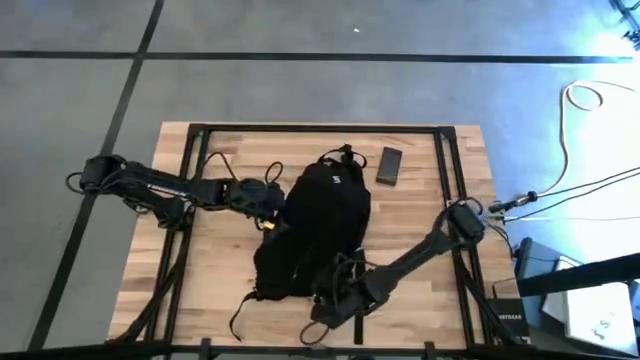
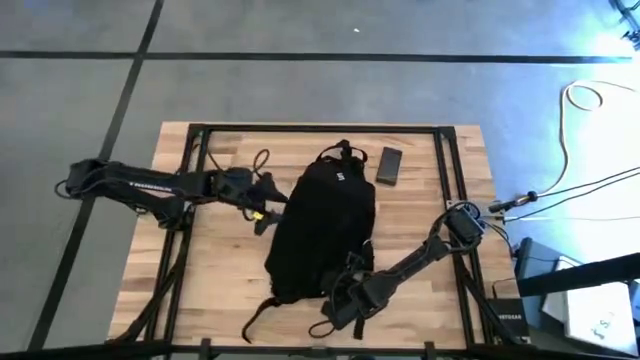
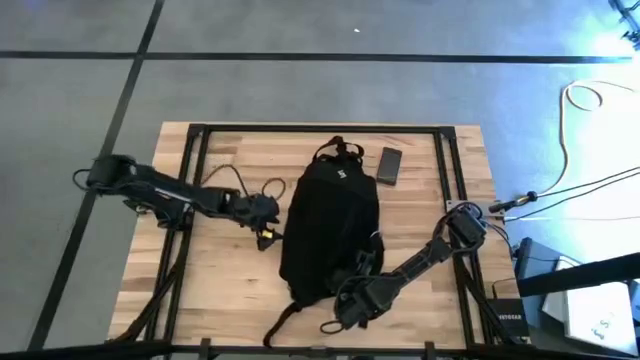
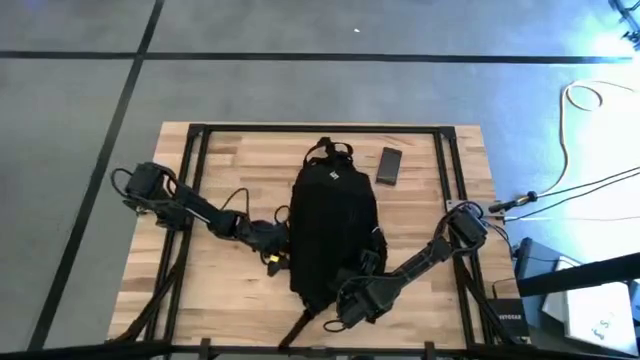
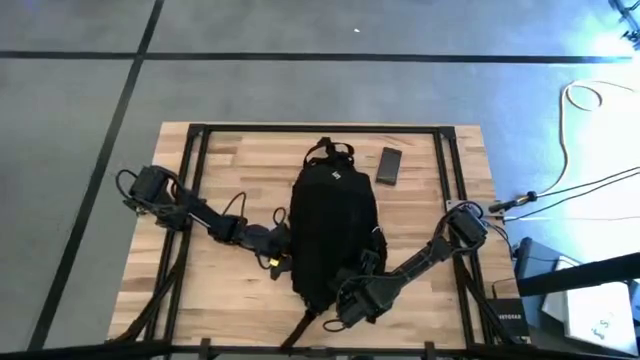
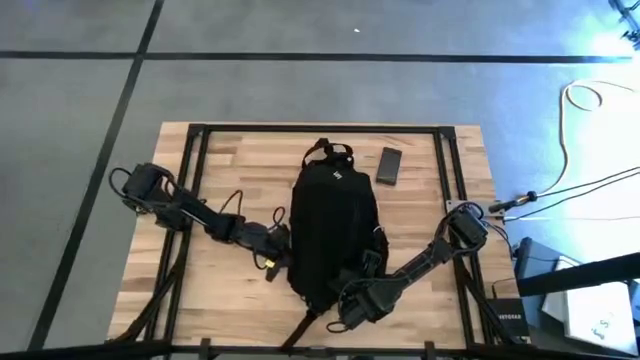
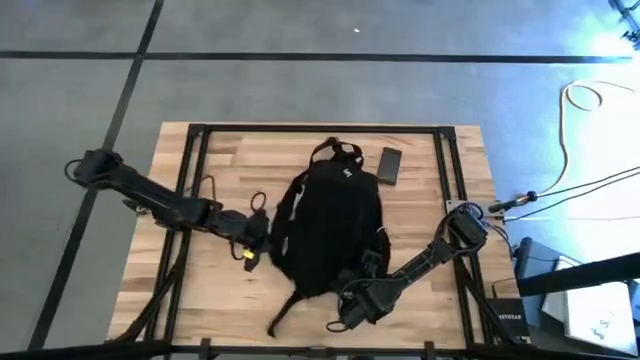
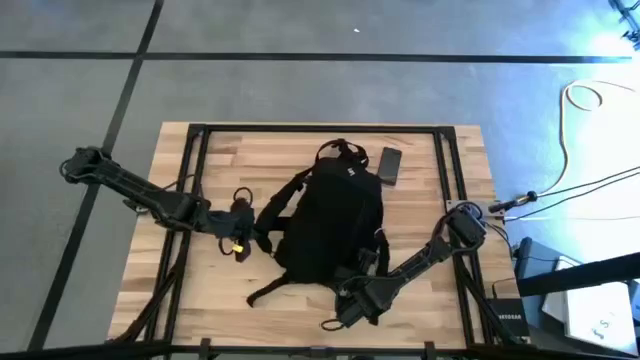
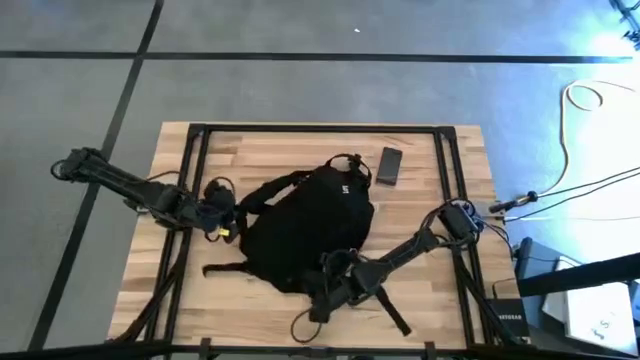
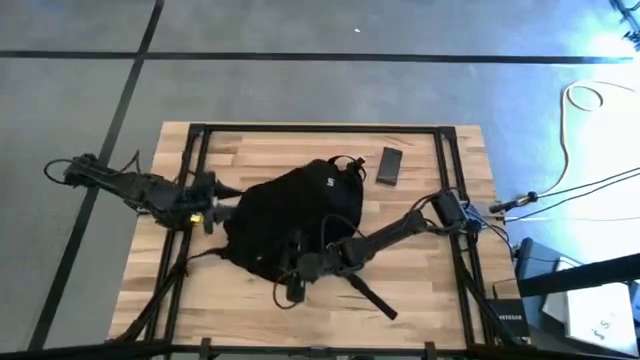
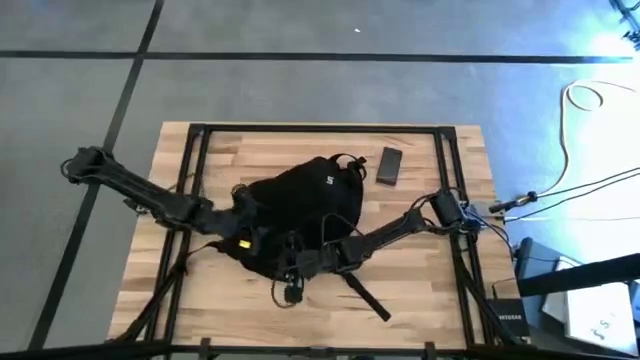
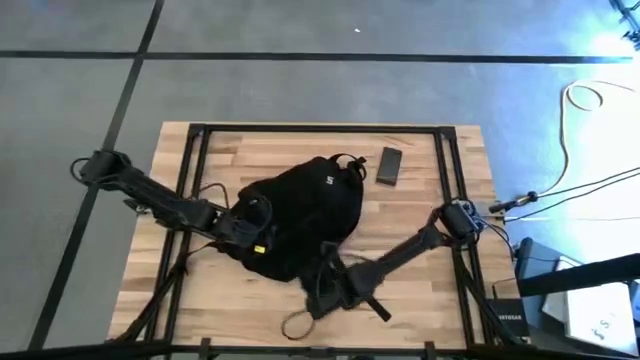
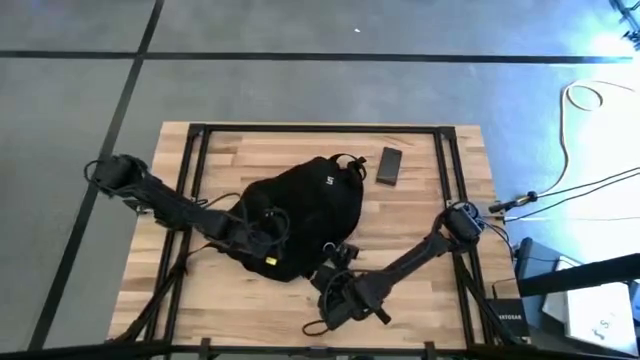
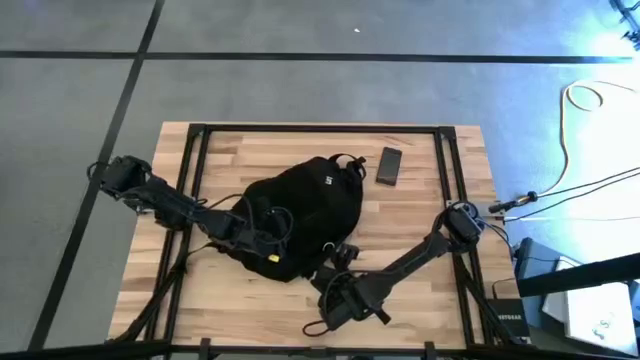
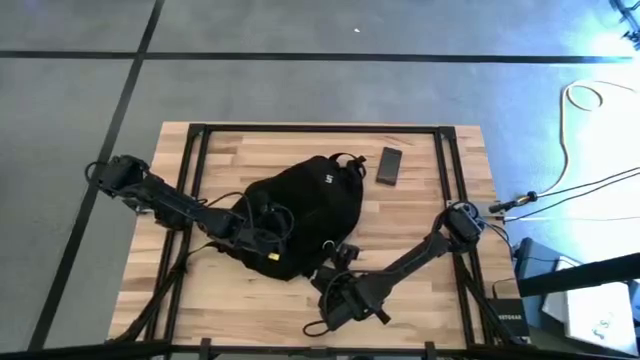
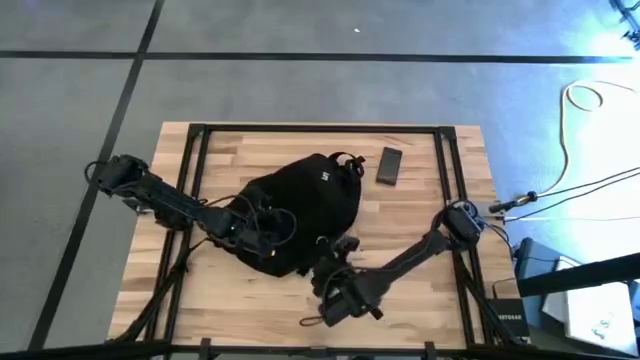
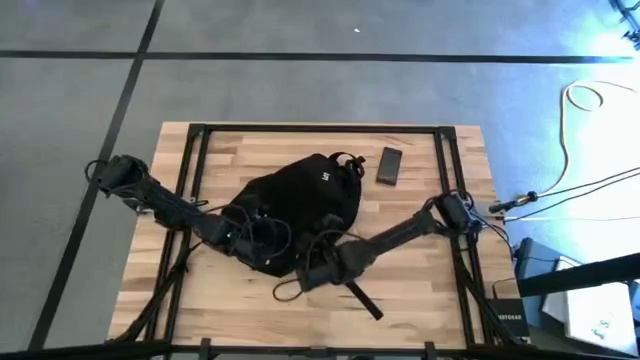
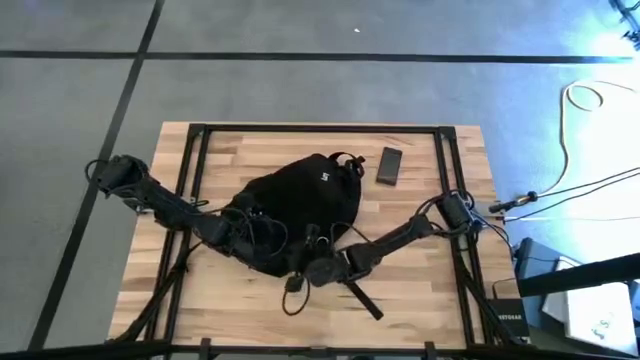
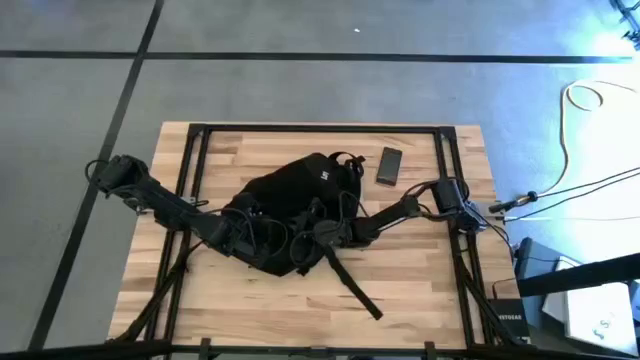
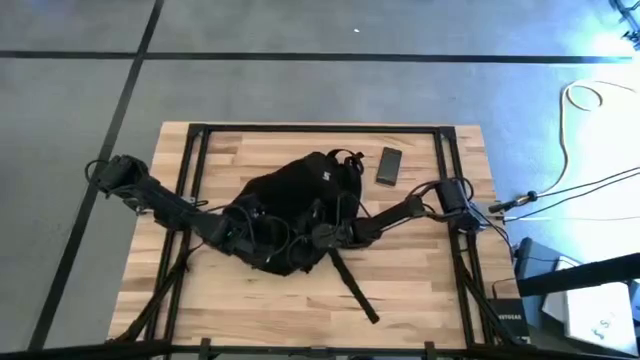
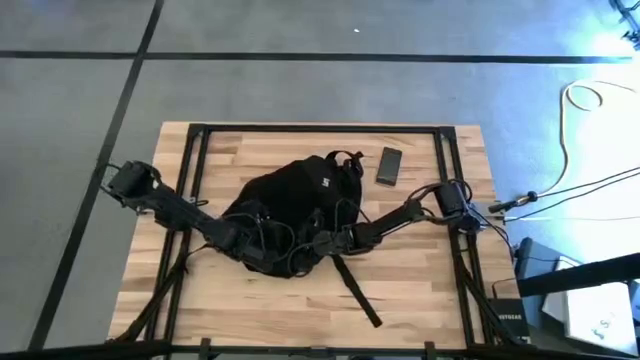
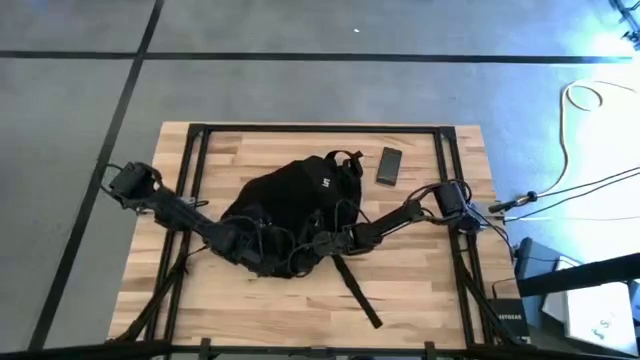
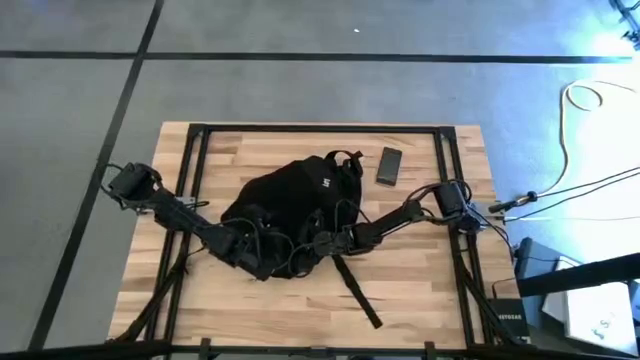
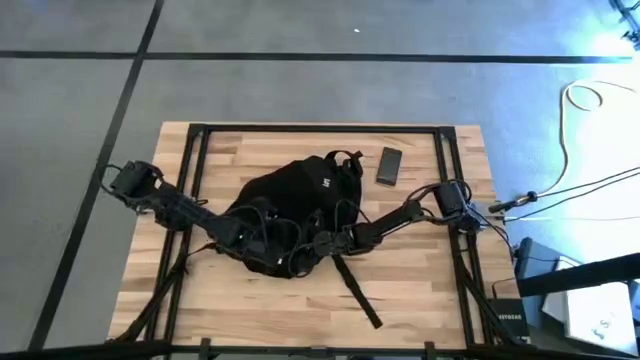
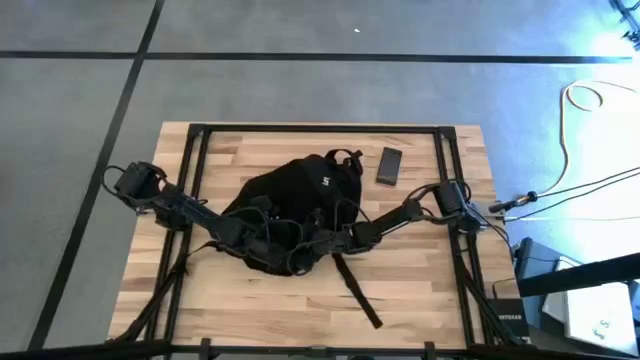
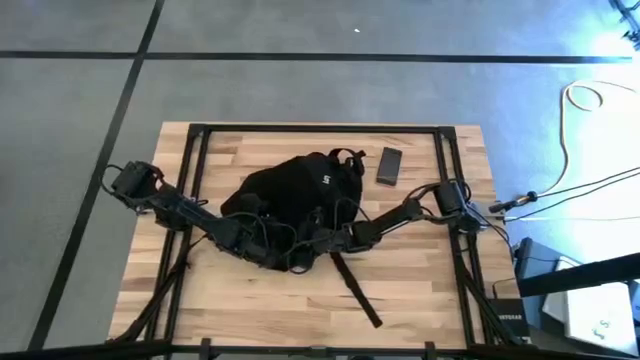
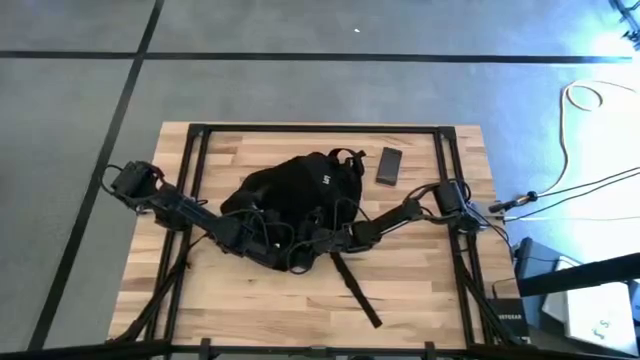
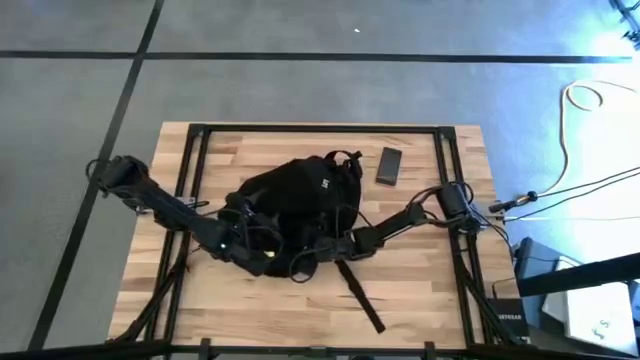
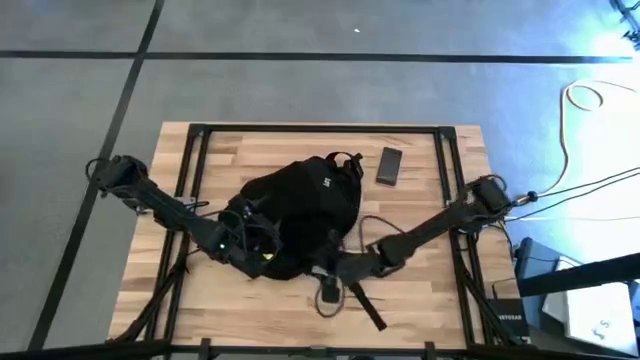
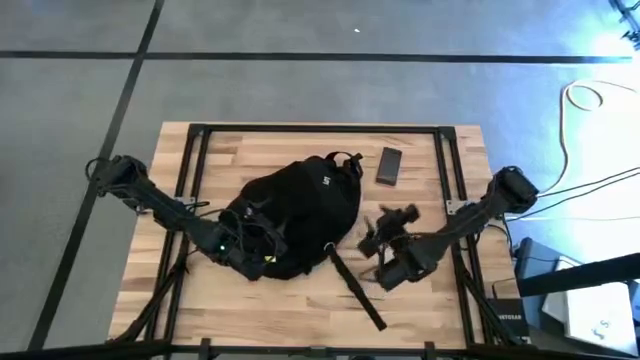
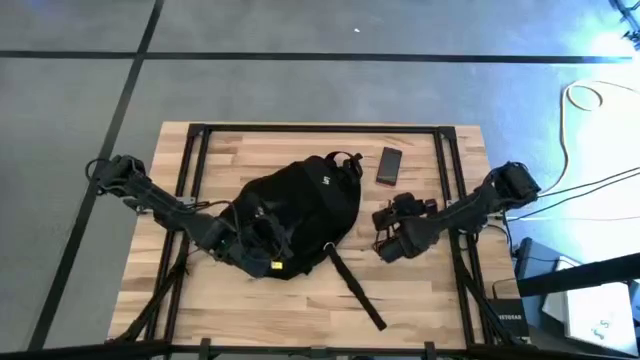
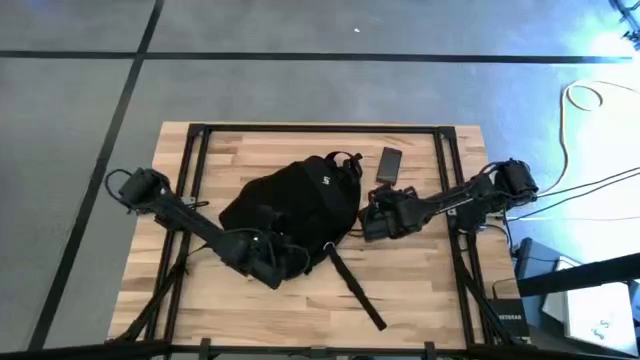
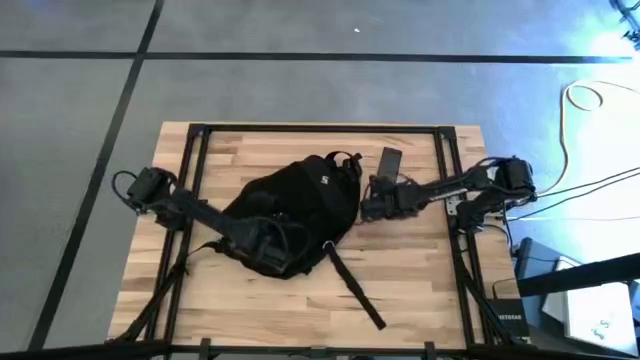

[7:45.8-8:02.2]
Task: Unpack backpack
Adjust the black bag
